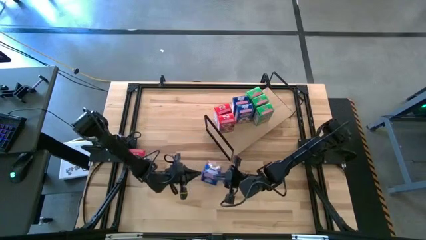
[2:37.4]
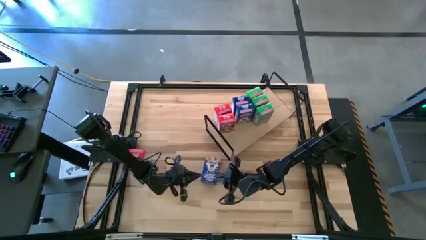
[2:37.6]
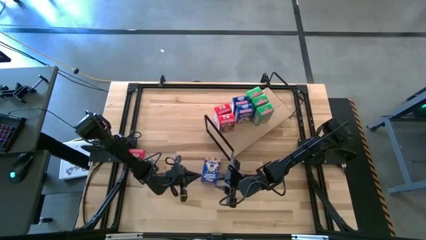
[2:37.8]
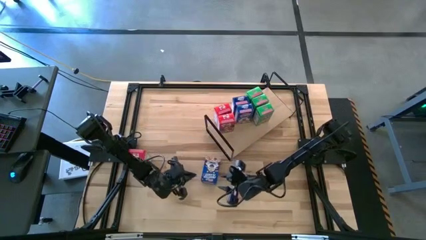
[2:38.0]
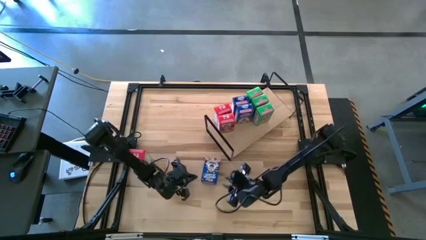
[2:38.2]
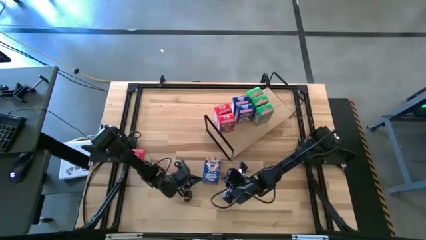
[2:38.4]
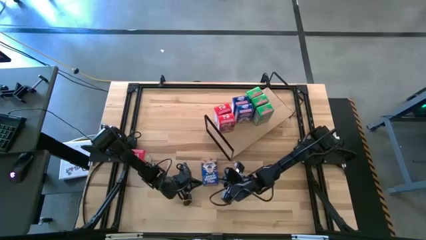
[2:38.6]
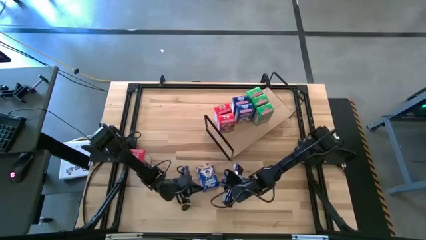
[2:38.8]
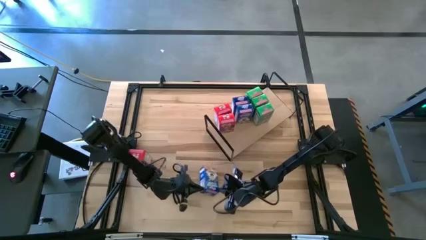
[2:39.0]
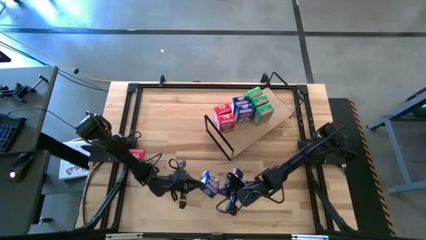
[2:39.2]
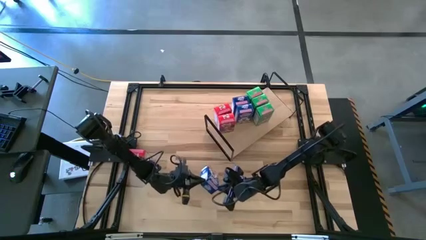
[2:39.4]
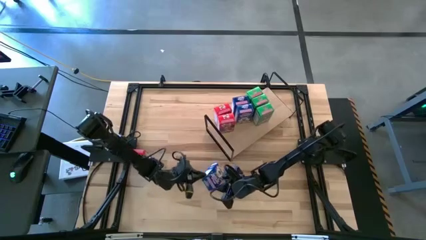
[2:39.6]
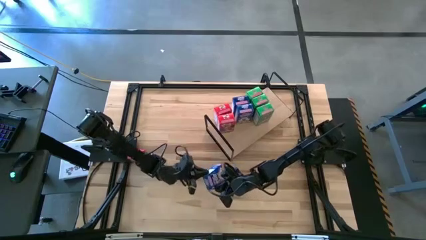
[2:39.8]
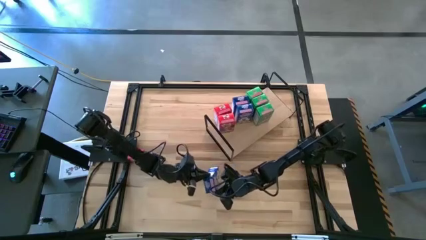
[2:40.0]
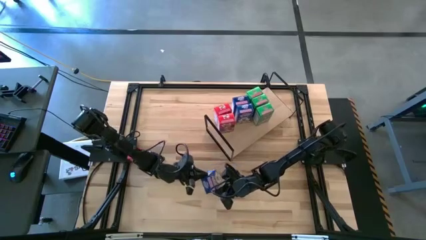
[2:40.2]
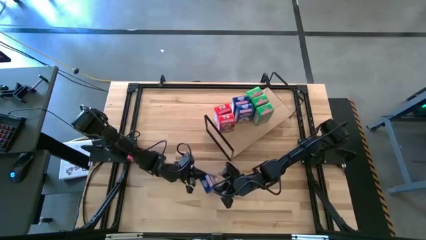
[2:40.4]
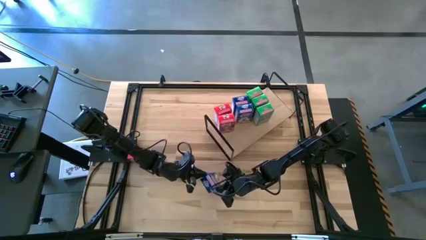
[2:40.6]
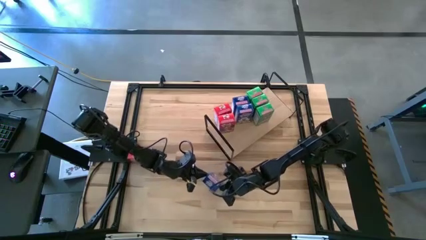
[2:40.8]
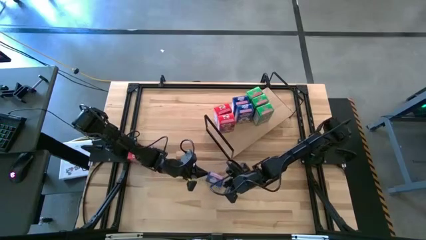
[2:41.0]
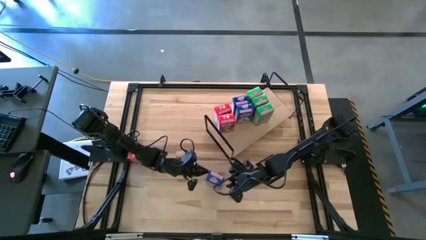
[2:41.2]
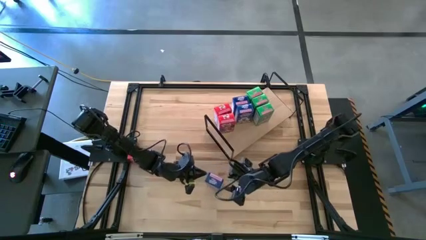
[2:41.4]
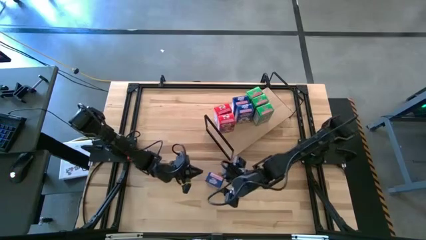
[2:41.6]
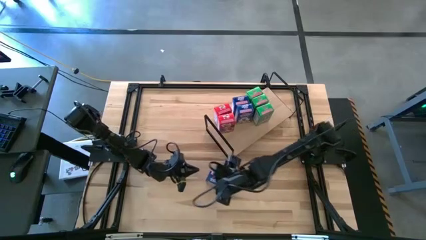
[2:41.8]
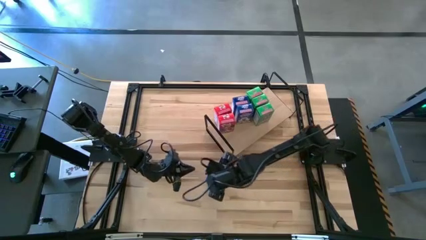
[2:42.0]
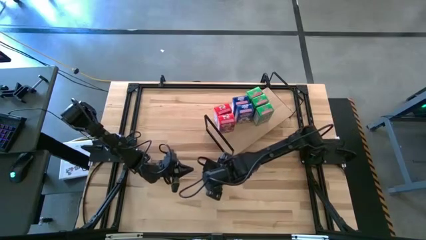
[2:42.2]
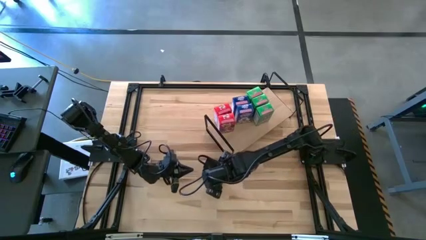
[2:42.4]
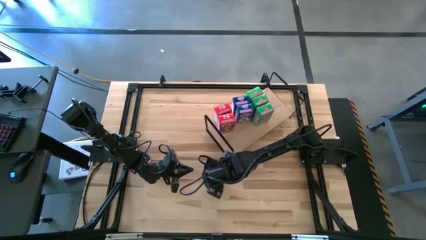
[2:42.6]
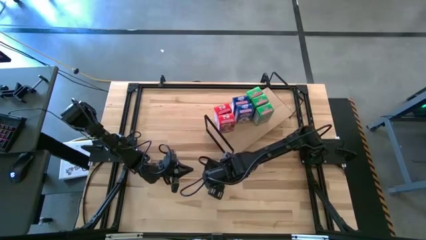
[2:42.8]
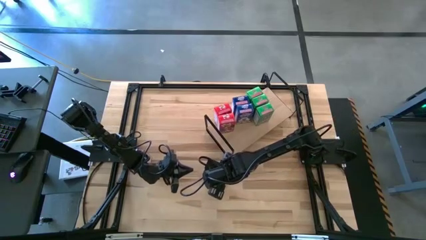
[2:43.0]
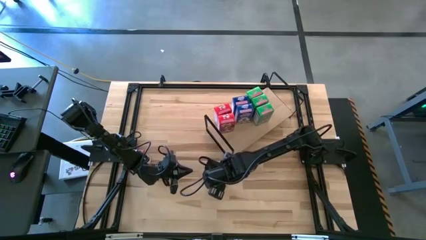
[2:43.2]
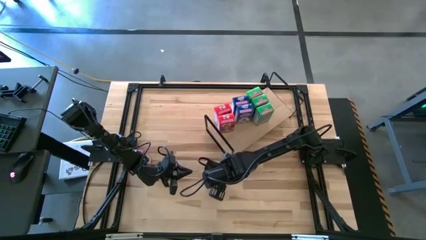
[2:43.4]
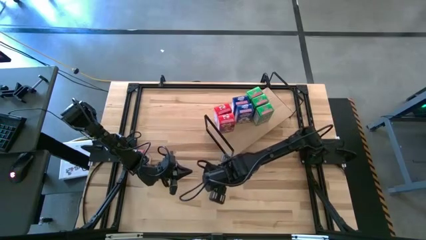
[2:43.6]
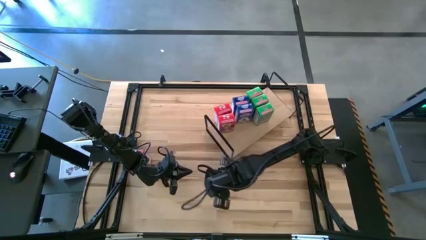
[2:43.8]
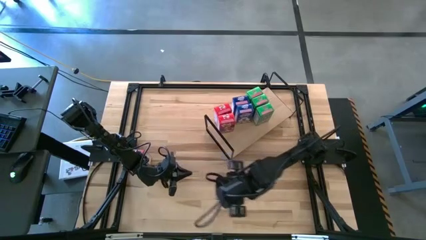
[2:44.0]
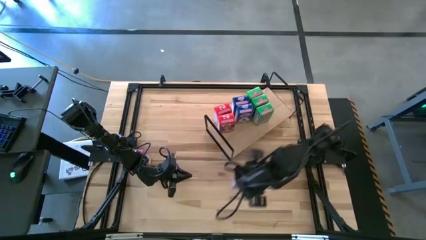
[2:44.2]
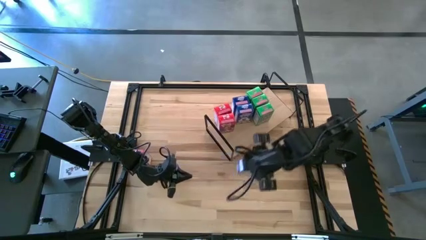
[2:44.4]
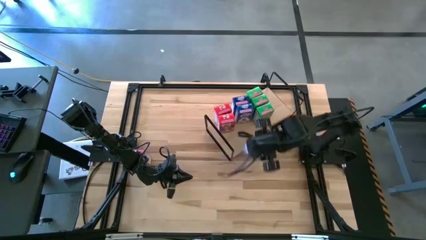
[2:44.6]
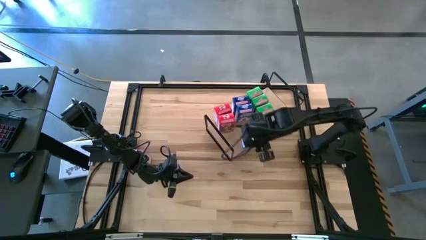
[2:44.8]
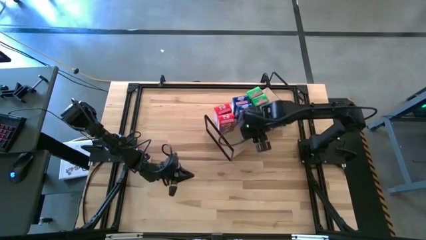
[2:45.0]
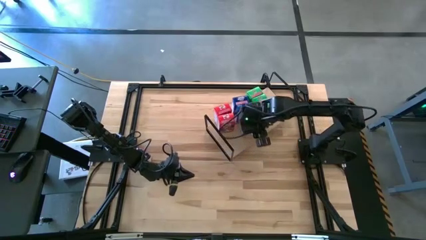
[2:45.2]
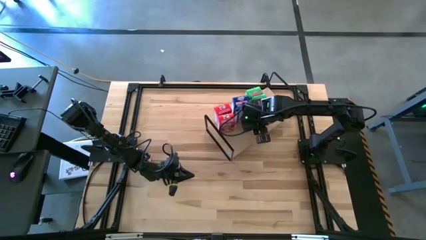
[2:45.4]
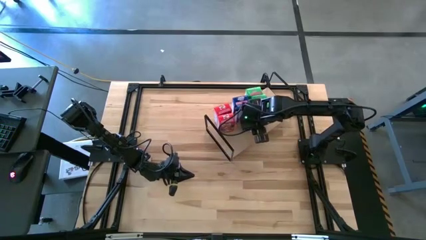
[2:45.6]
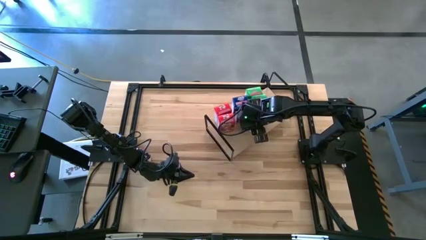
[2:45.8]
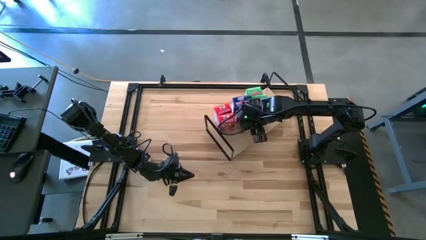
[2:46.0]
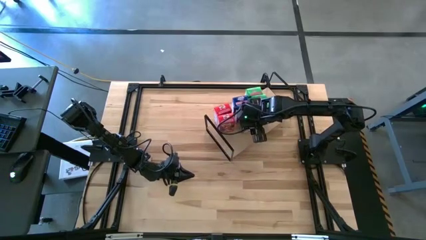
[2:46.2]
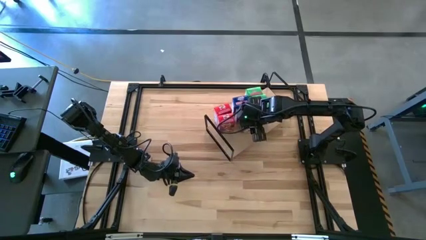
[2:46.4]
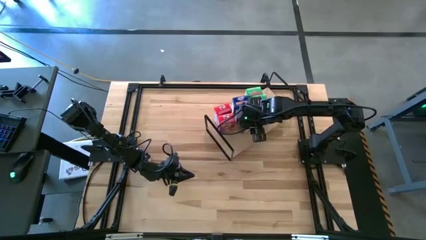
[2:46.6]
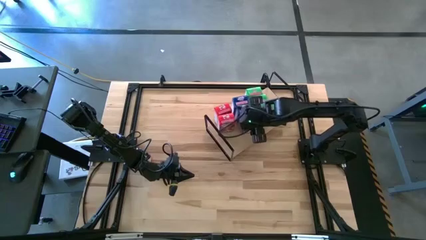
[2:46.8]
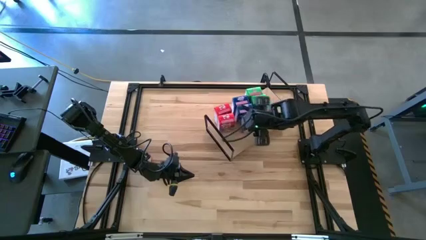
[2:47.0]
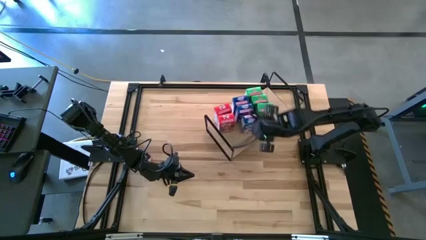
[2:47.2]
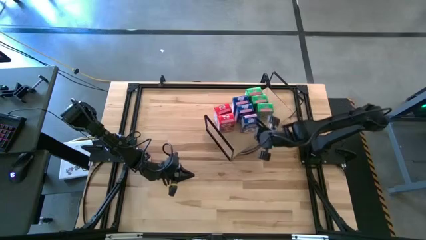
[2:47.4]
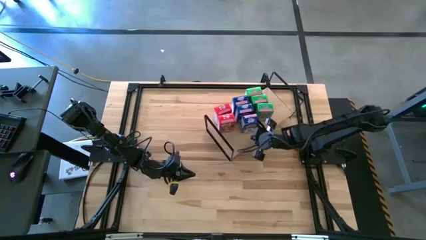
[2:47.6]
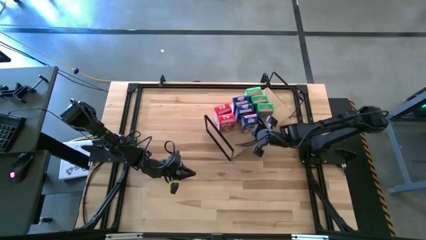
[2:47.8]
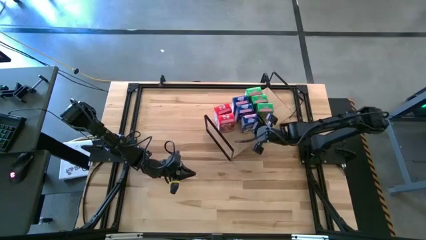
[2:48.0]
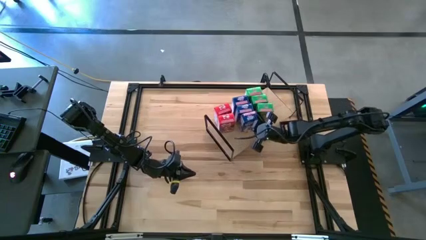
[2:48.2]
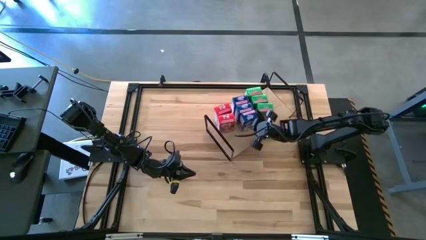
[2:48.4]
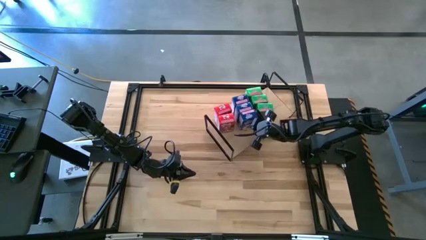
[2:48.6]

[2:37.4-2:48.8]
Task: Stack cereal on shelf
Put the blue cereal box on the shelf aligned with the other blue cereal boxes

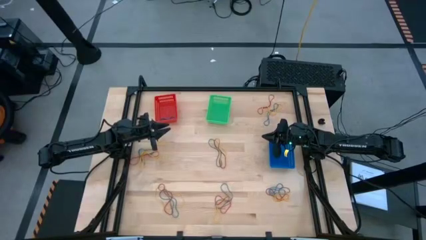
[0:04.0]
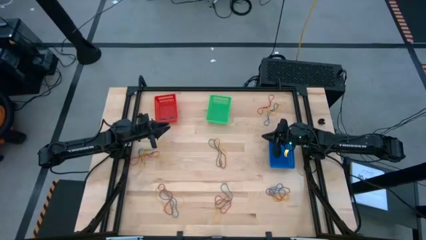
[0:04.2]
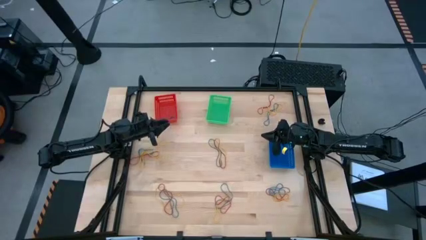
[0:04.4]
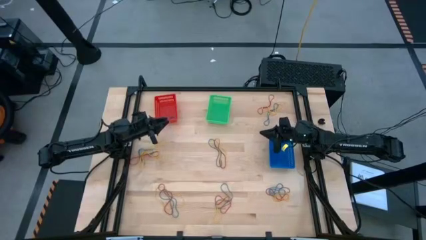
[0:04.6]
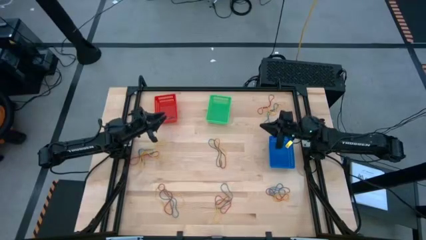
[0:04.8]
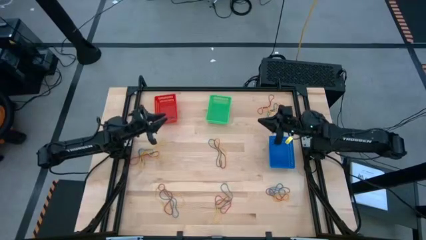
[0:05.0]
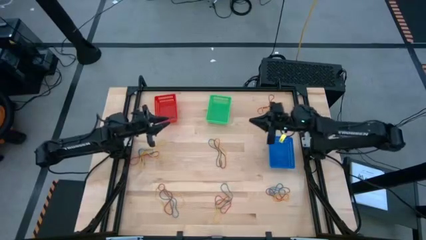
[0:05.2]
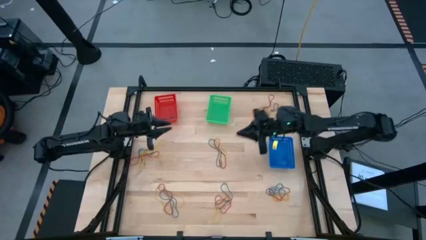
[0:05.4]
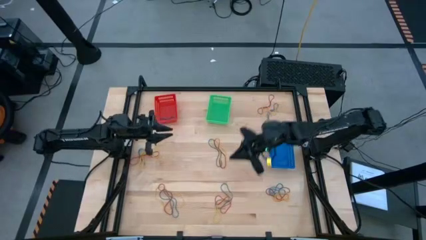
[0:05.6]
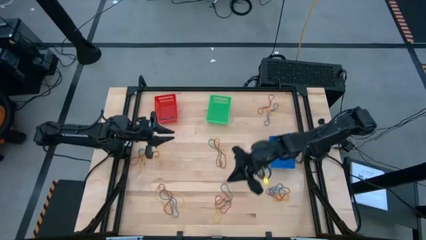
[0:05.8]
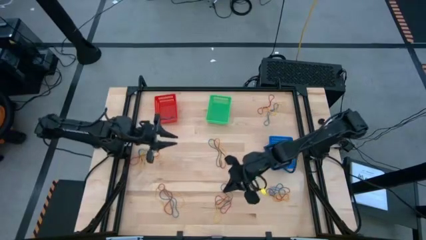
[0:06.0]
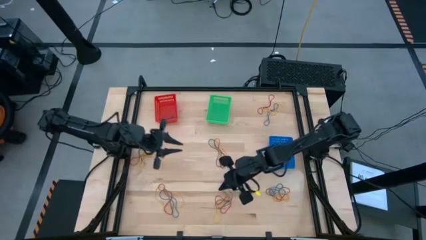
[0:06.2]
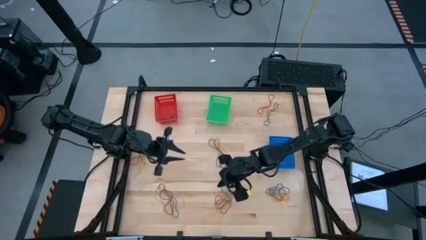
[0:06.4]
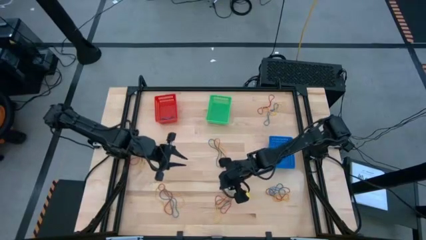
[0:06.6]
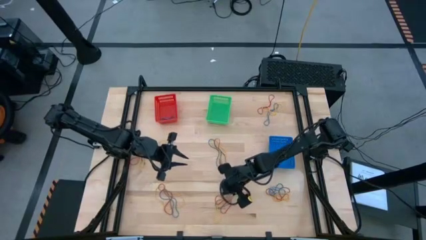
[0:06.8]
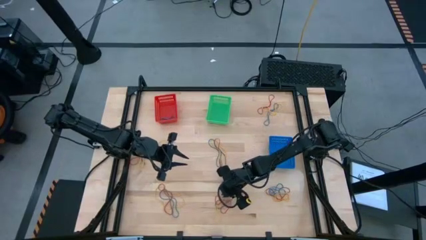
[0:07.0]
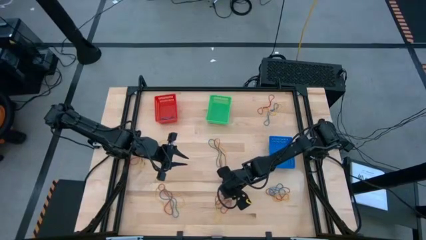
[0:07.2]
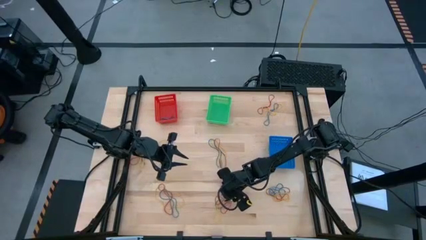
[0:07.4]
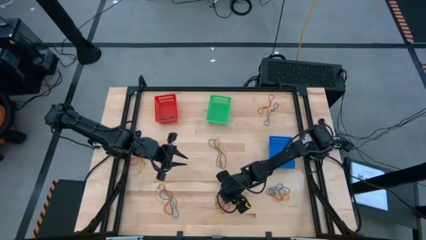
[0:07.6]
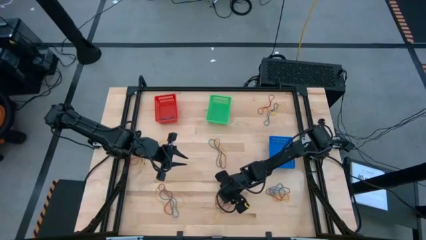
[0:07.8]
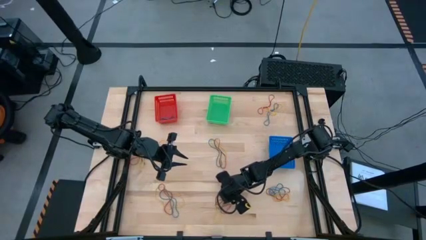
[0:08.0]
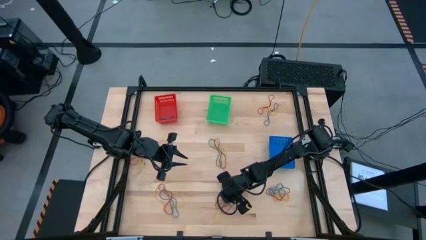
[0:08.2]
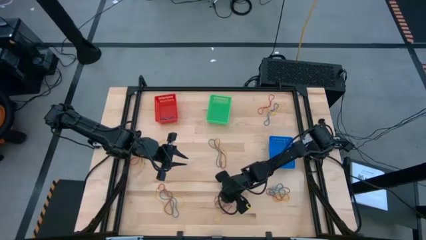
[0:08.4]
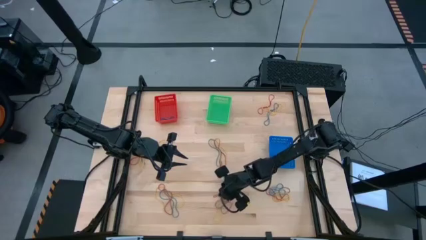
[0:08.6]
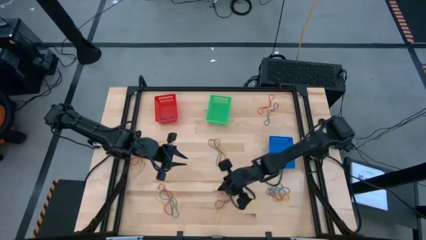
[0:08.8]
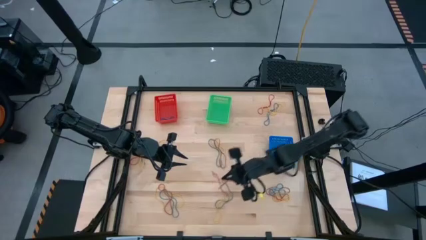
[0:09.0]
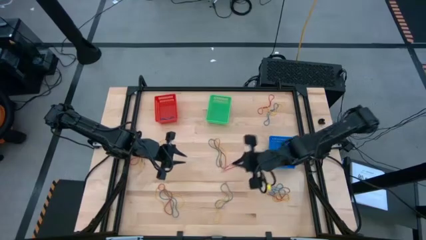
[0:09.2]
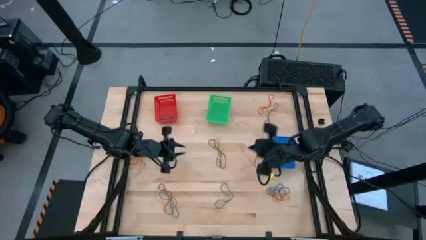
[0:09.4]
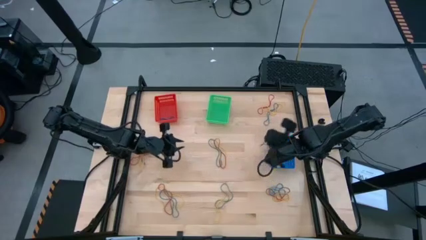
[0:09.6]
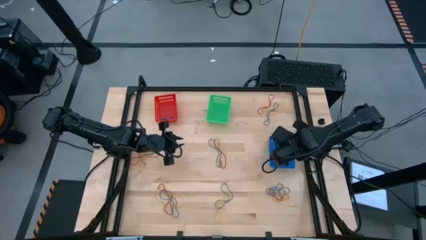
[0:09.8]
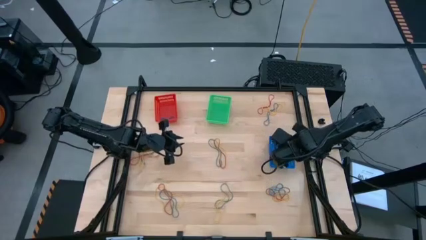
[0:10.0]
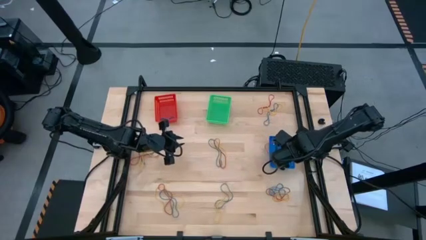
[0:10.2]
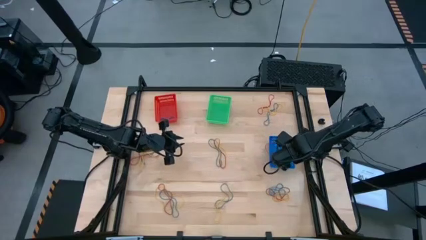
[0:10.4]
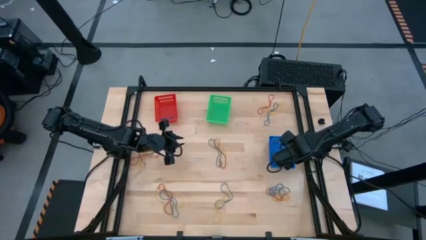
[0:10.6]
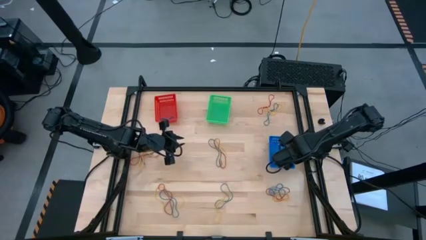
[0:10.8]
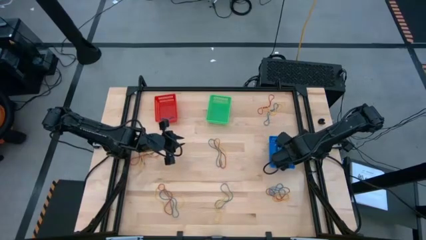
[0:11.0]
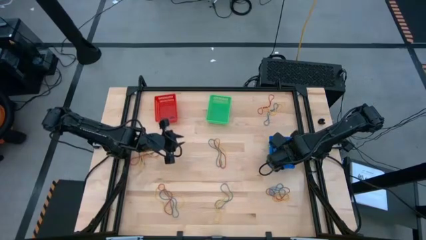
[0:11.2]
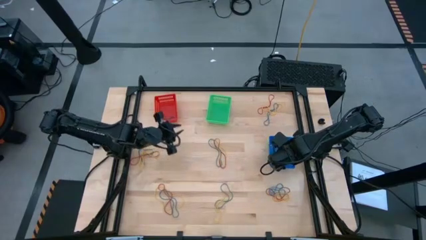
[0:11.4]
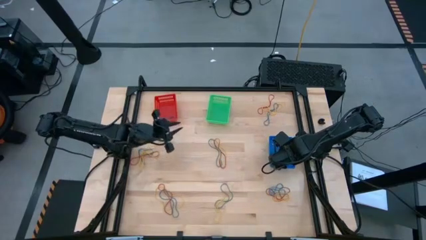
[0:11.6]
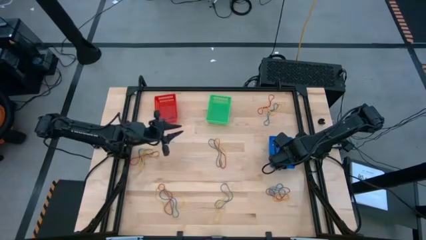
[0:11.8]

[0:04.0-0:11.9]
Task: Sort rubber bands into baskets
Put the red rubber band into the blue bin
